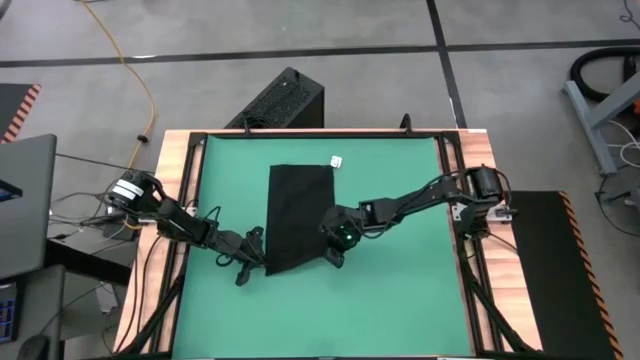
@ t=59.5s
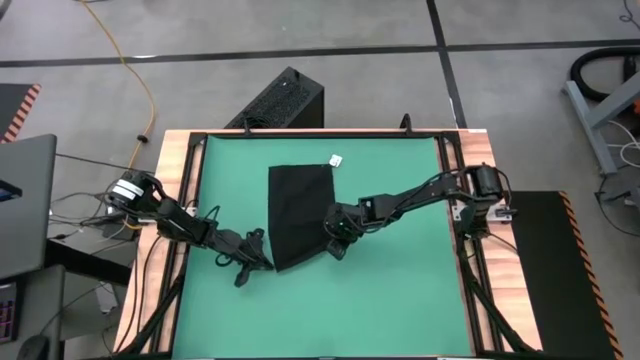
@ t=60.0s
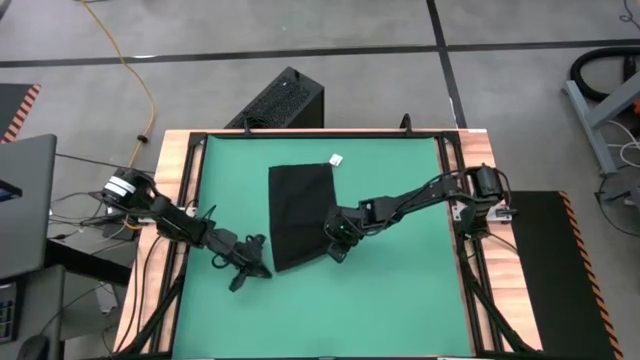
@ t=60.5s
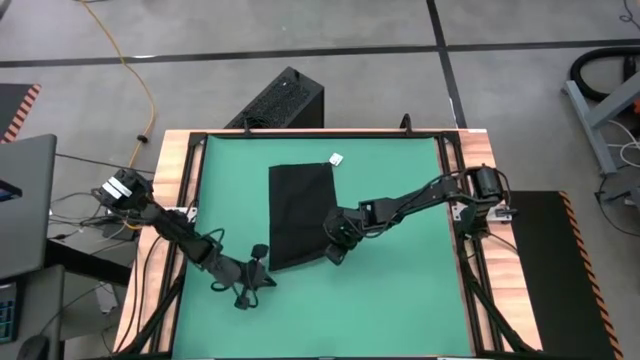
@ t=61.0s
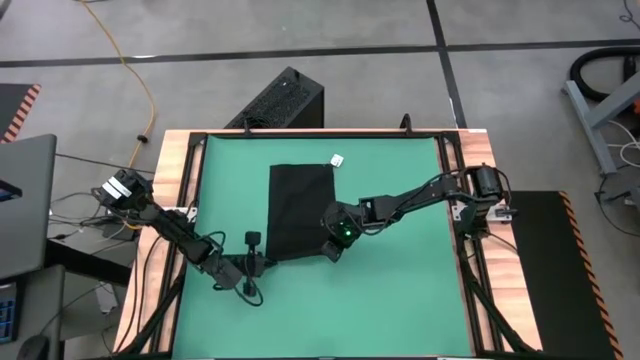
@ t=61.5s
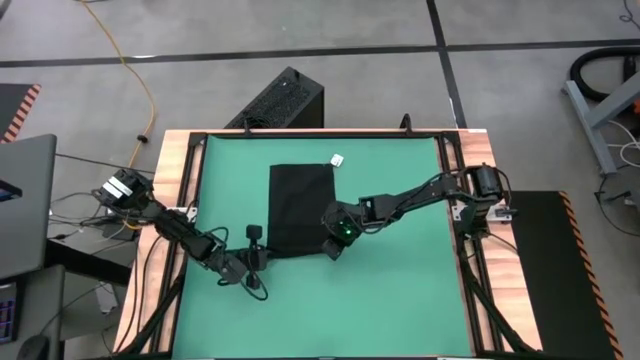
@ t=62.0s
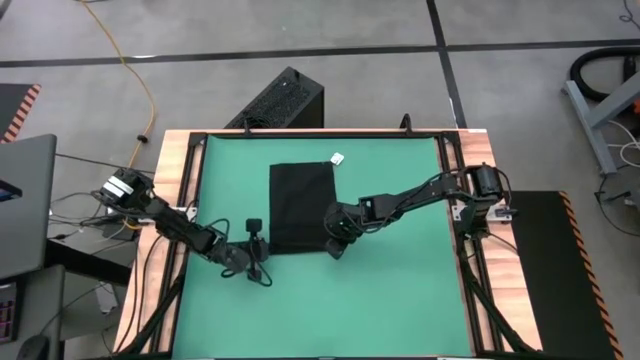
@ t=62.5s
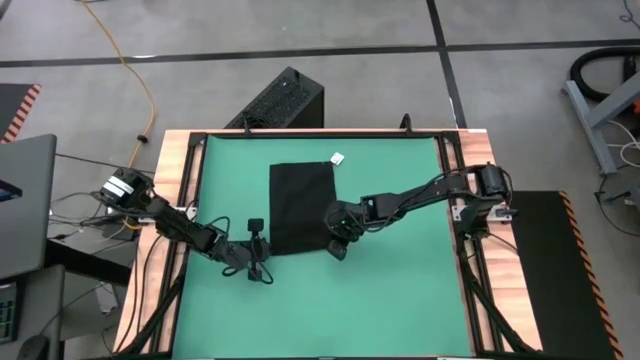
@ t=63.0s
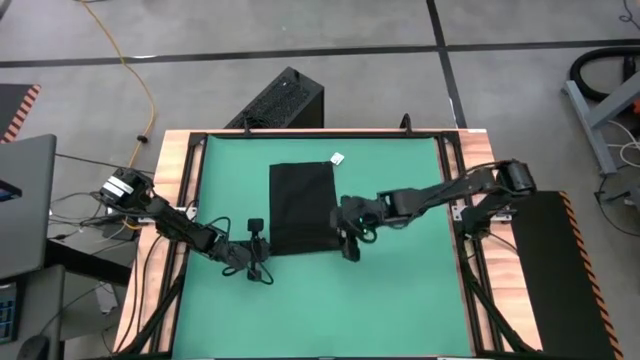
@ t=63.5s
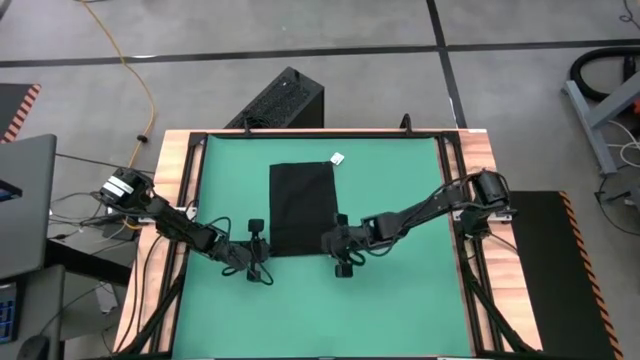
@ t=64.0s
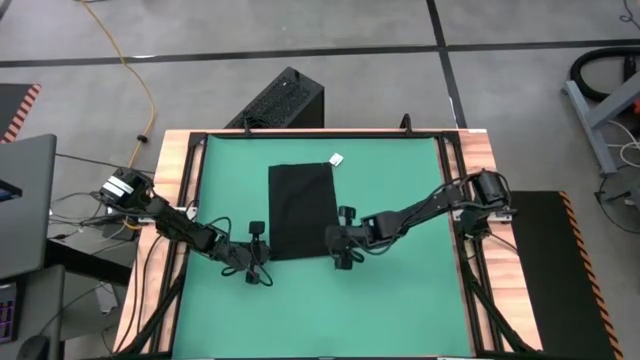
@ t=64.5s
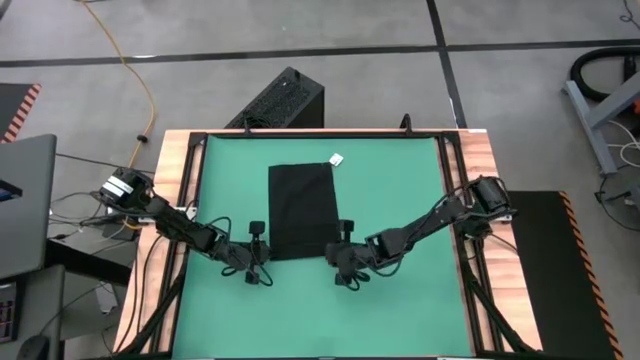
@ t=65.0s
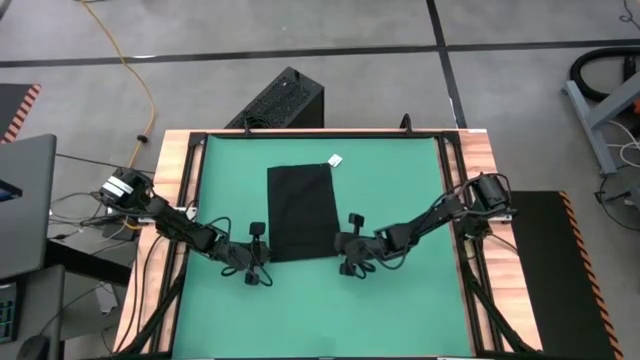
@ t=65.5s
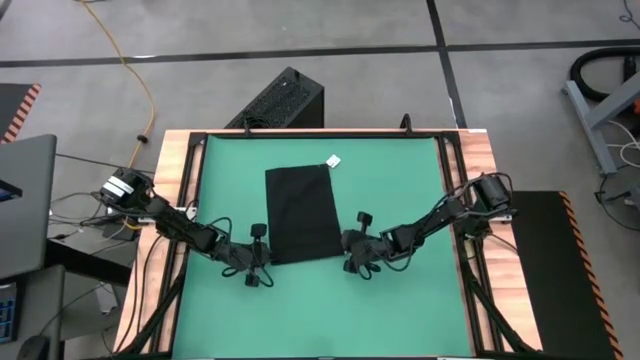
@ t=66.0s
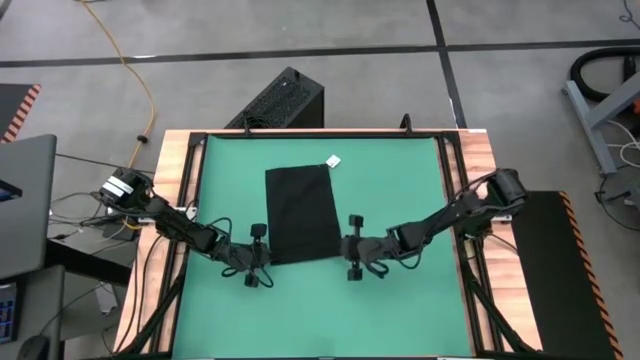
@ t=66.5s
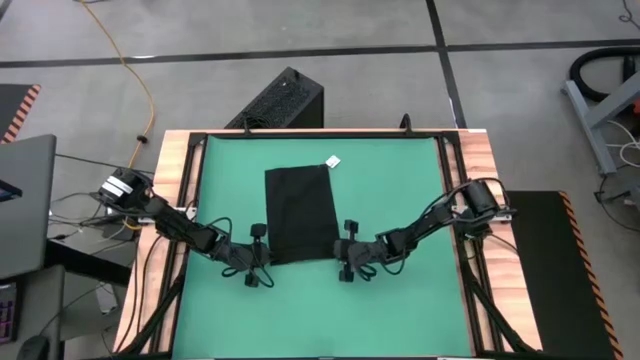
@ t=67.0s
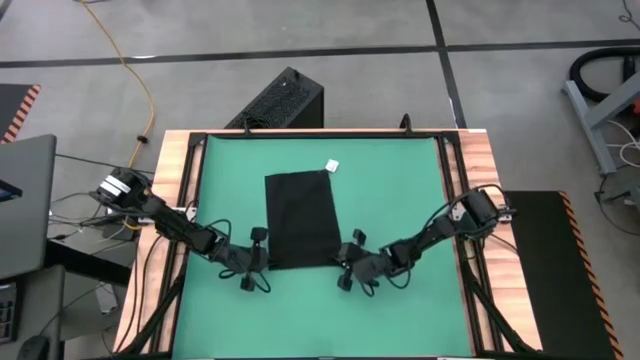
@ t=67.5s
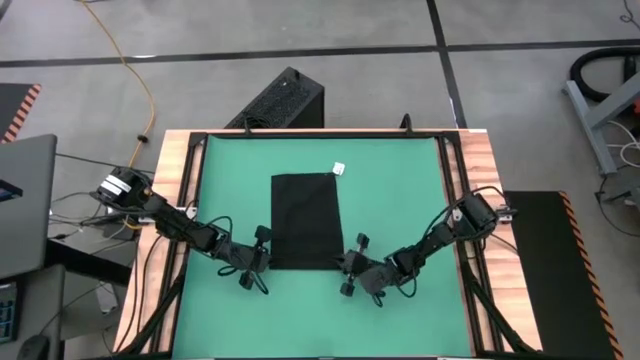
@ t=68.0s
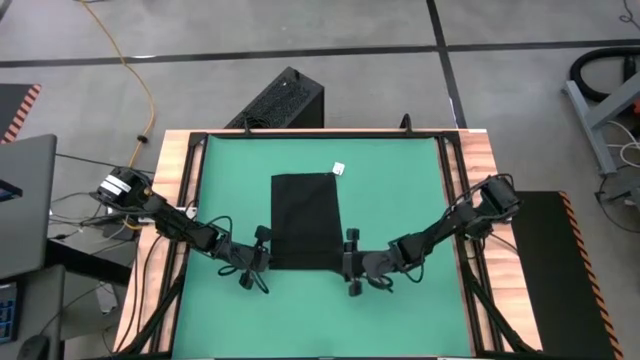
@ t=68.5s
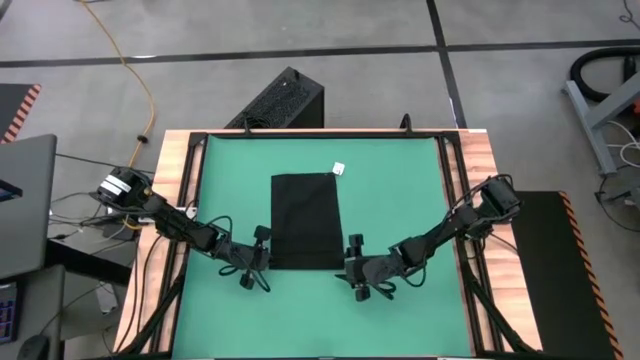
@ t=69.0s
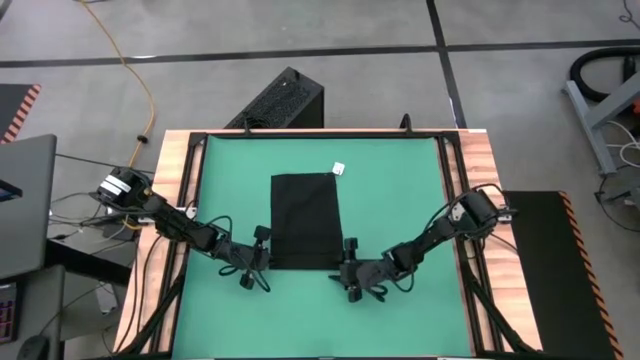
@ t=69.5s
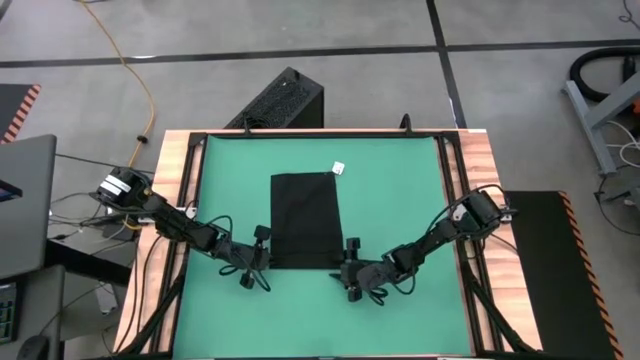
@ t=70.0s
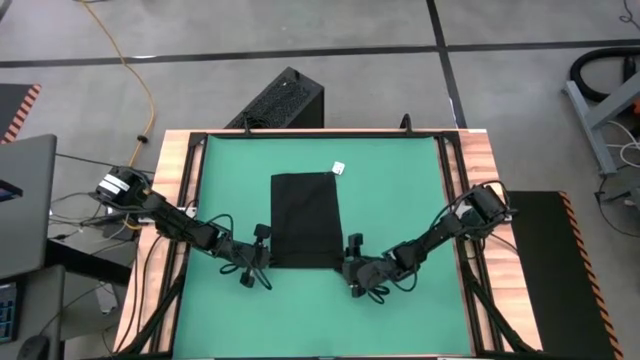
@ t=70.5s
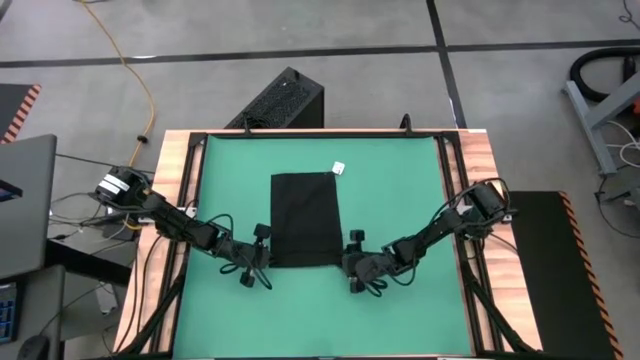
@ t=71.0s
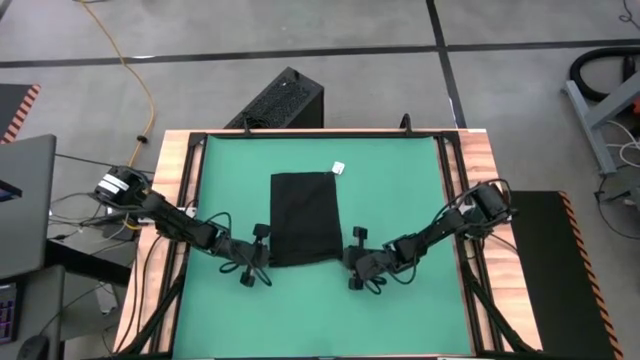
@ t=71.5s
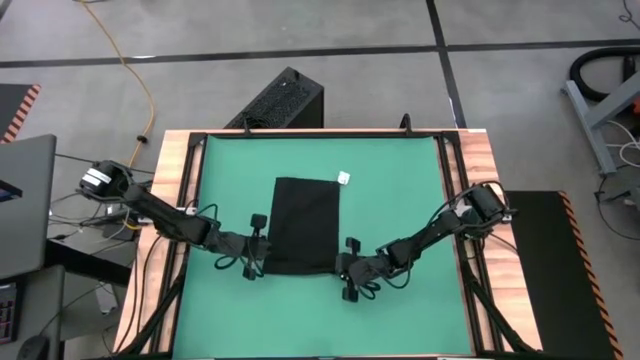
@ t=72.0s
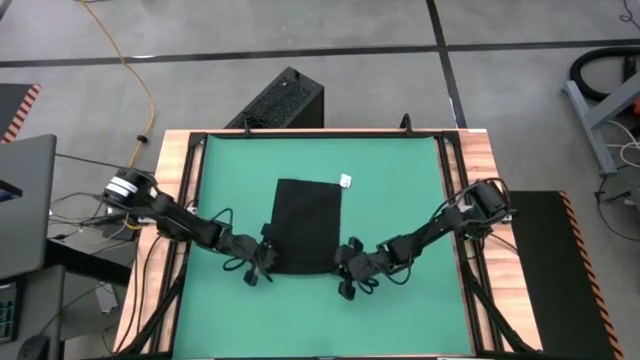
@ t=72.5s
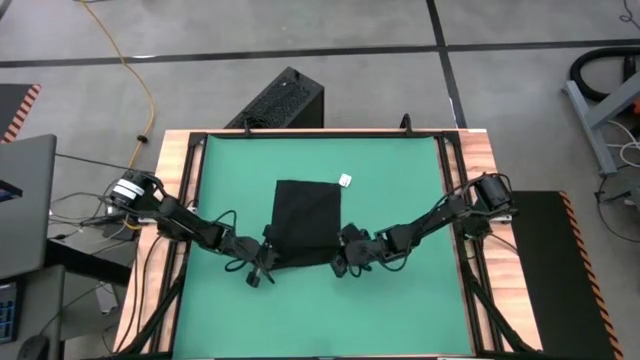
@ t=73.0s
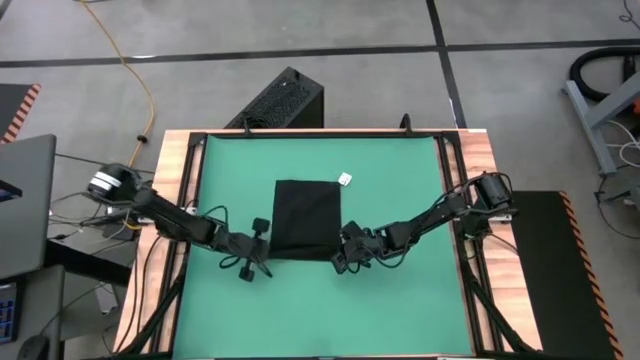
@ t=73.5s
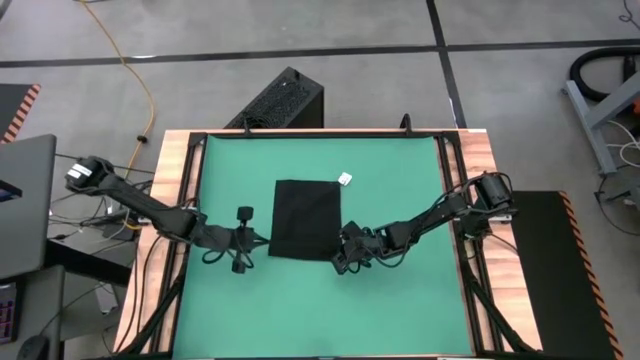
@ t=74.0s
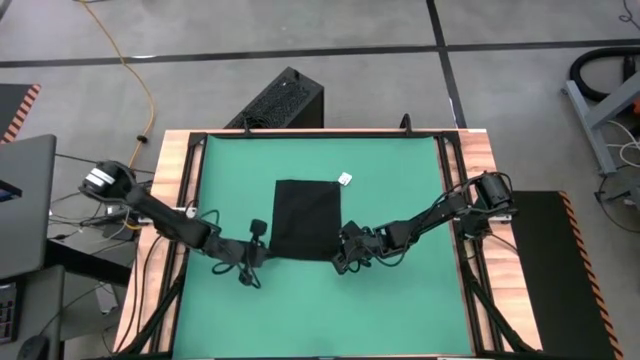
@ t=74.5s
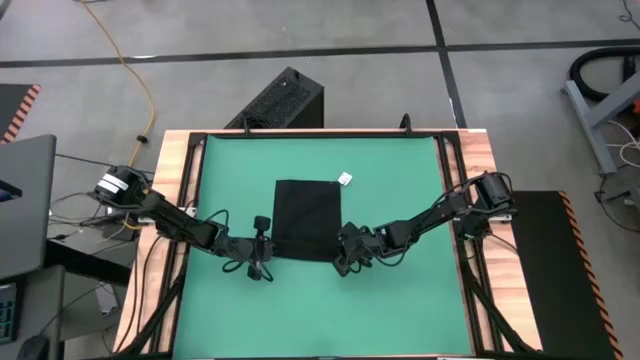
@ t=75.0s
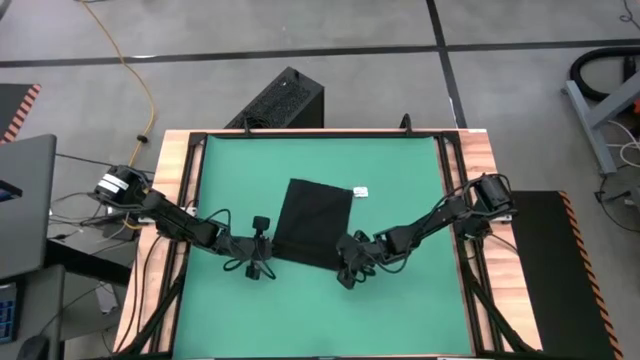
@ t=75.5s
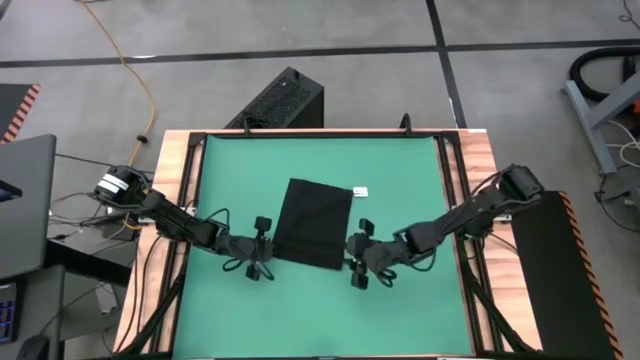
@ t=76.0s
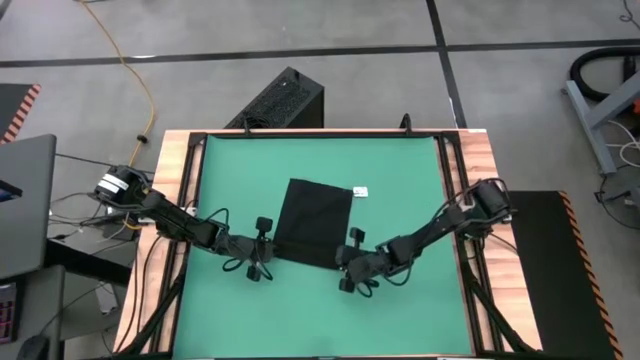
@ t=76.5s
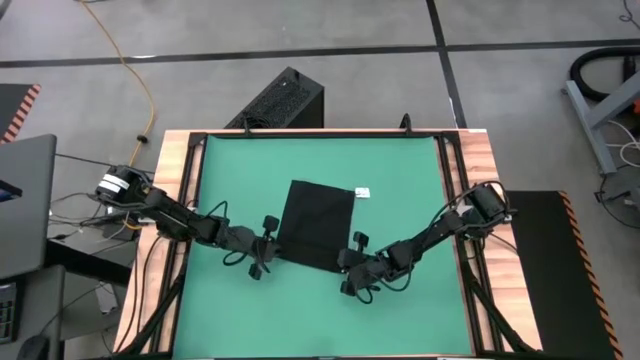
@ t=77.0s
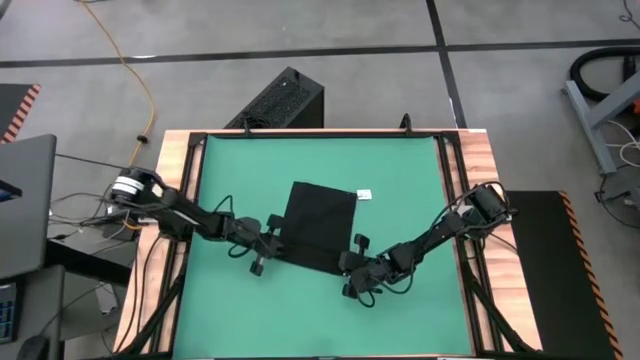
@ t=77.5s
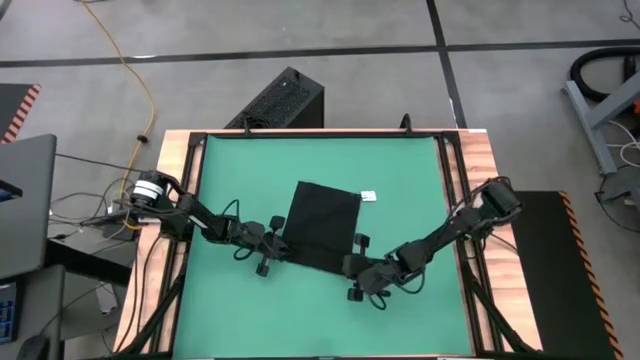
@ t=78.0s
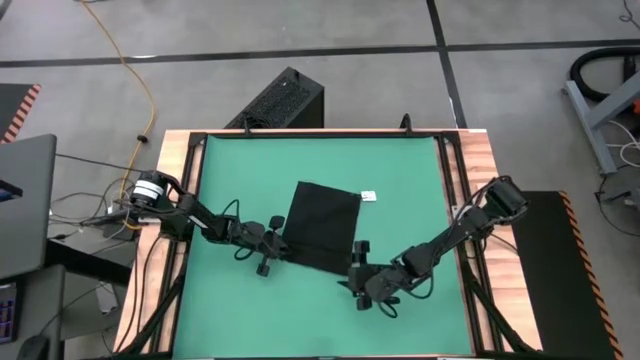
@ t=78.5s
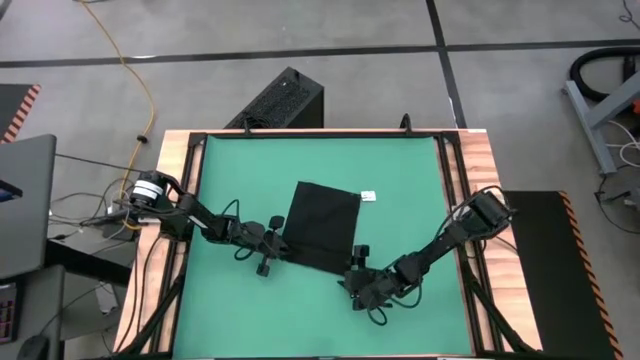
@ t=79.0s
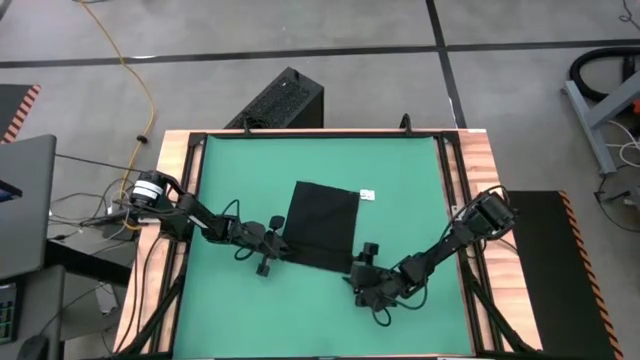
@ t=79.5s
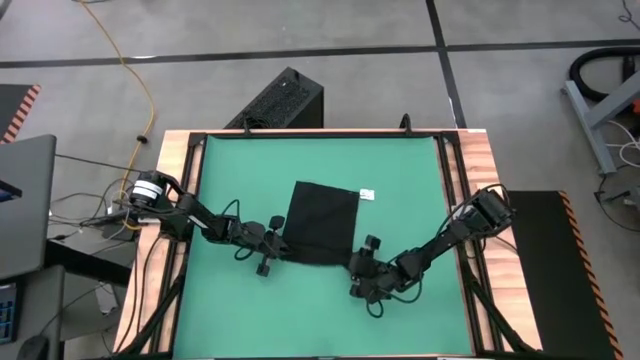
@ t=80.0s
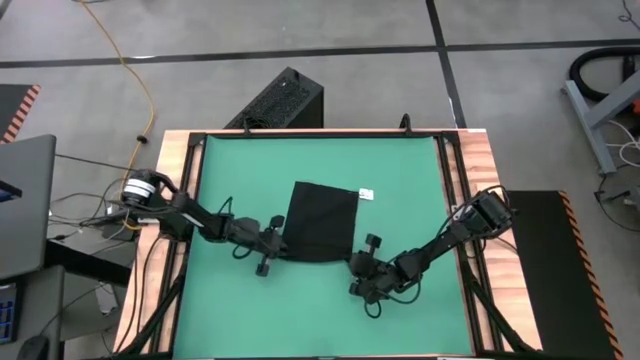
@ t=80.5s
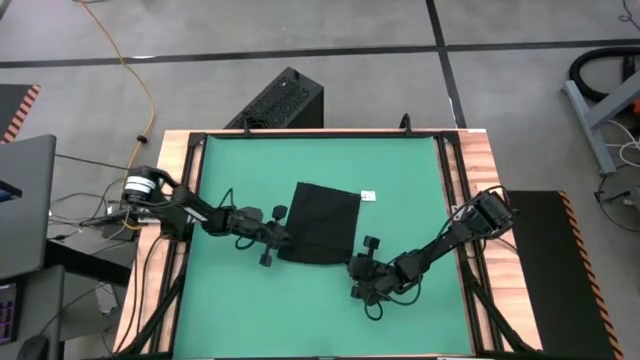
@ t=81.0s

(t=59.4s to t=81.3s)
Task: Roll towel
Roll the black towel
